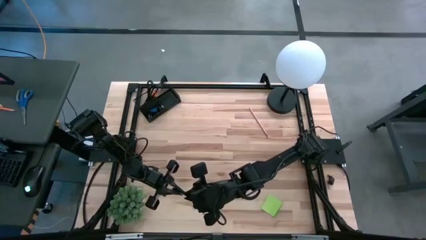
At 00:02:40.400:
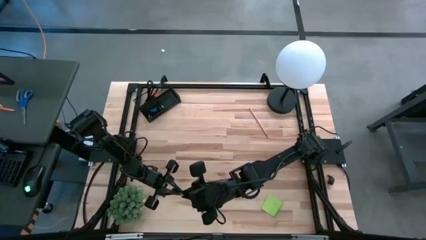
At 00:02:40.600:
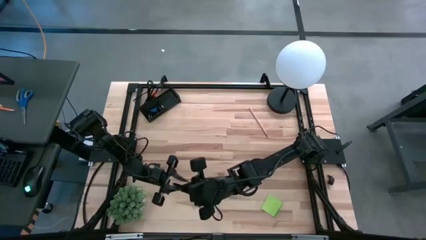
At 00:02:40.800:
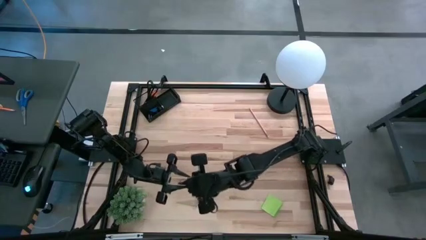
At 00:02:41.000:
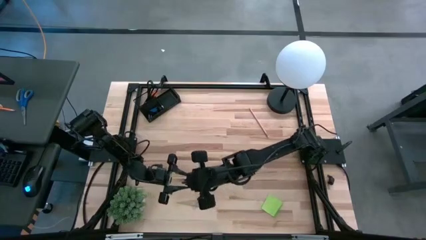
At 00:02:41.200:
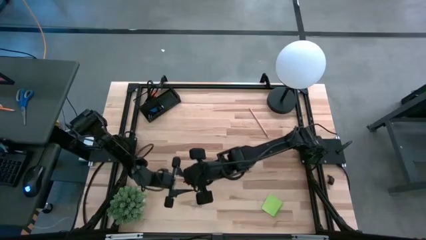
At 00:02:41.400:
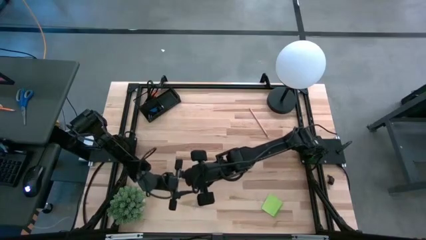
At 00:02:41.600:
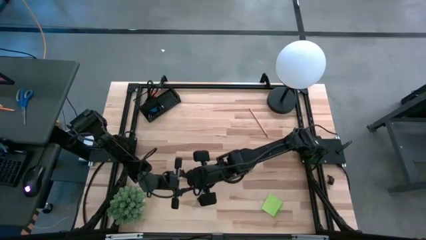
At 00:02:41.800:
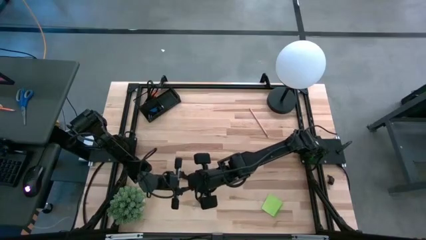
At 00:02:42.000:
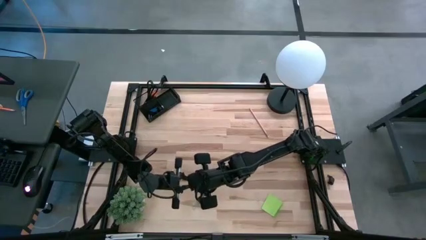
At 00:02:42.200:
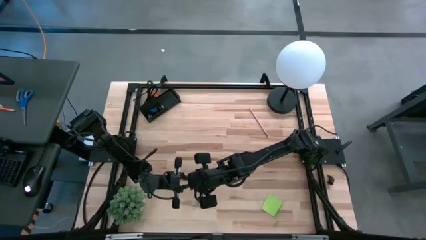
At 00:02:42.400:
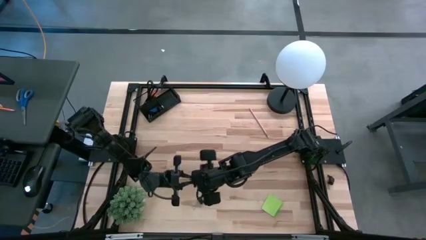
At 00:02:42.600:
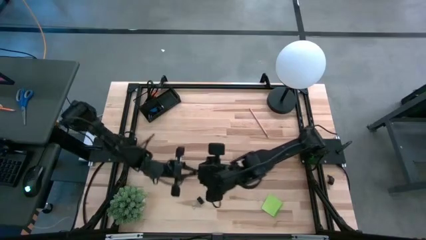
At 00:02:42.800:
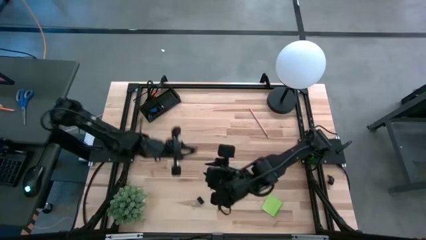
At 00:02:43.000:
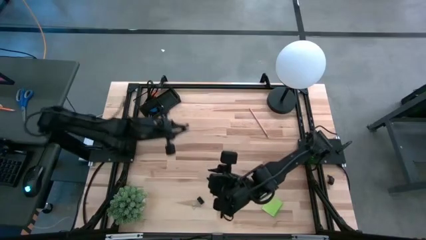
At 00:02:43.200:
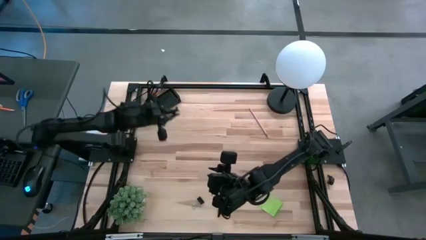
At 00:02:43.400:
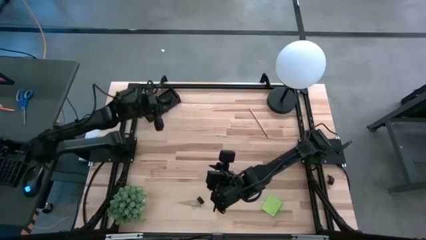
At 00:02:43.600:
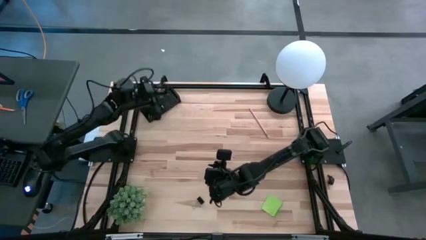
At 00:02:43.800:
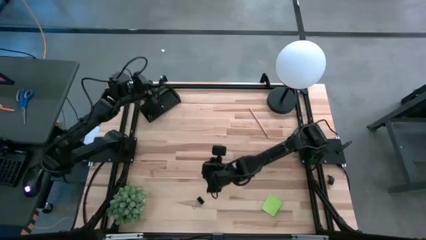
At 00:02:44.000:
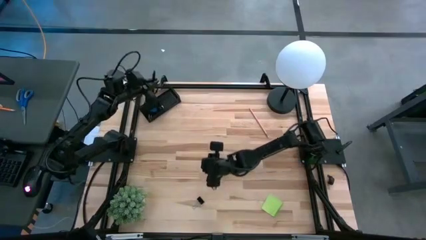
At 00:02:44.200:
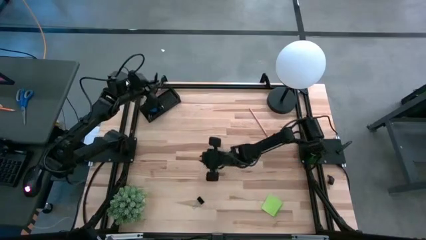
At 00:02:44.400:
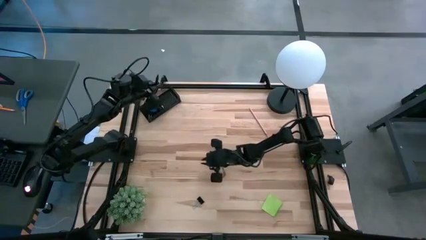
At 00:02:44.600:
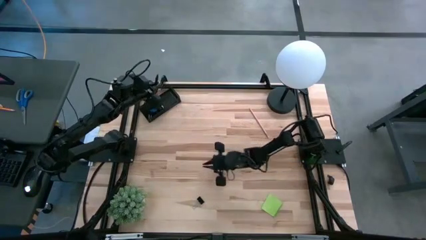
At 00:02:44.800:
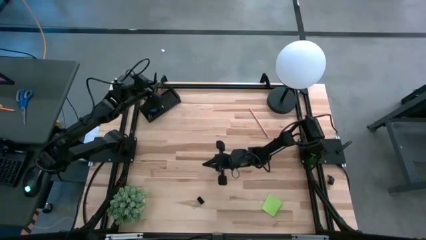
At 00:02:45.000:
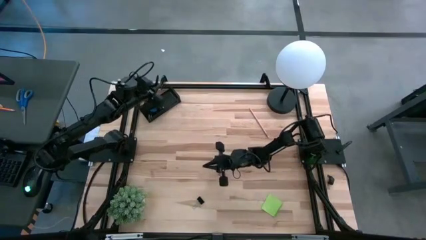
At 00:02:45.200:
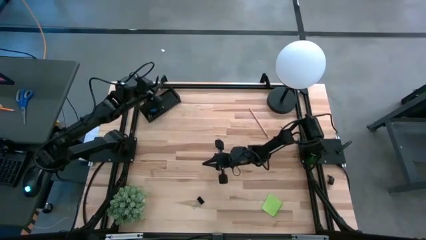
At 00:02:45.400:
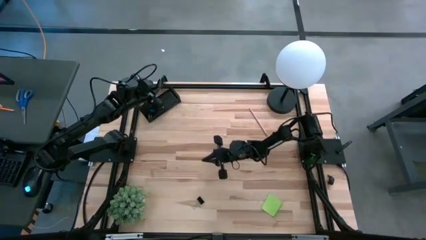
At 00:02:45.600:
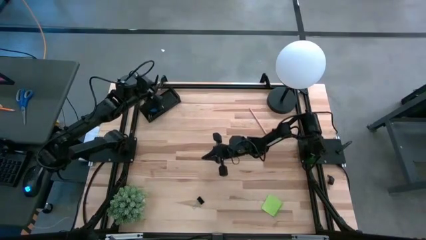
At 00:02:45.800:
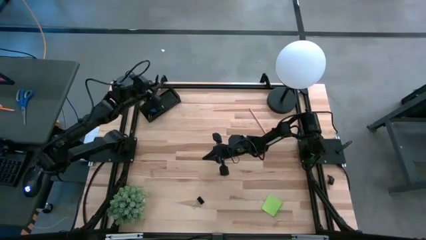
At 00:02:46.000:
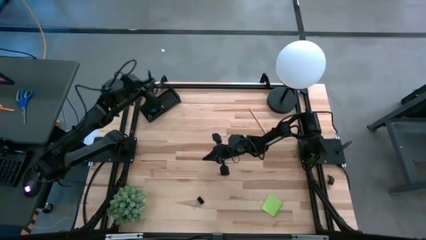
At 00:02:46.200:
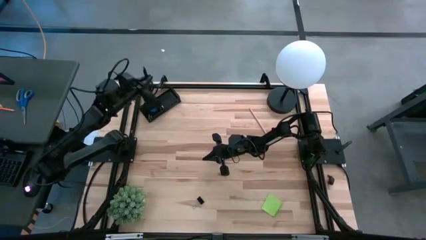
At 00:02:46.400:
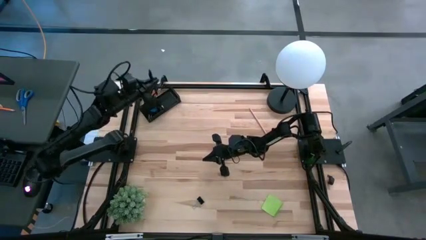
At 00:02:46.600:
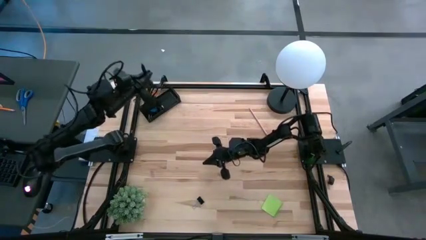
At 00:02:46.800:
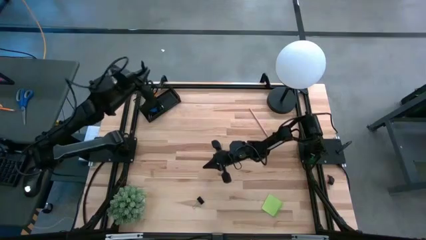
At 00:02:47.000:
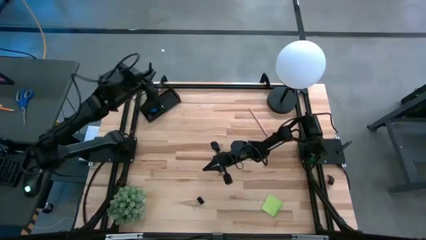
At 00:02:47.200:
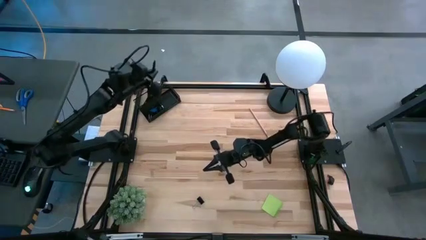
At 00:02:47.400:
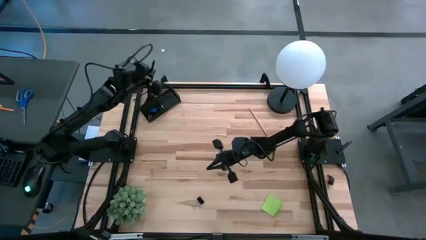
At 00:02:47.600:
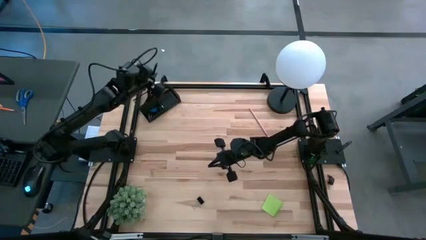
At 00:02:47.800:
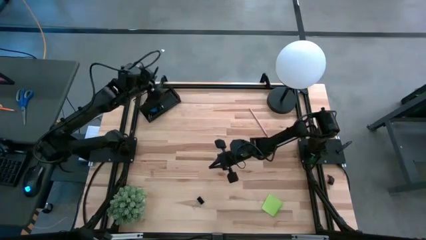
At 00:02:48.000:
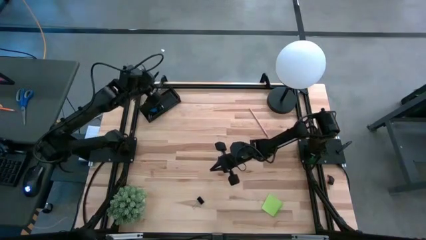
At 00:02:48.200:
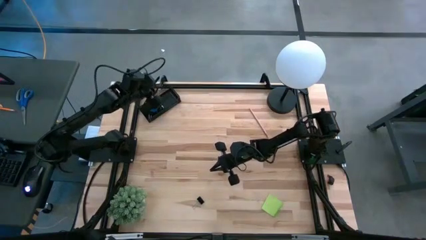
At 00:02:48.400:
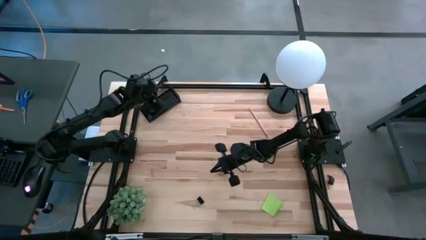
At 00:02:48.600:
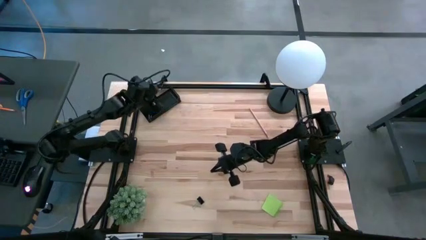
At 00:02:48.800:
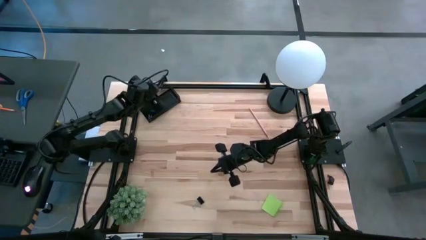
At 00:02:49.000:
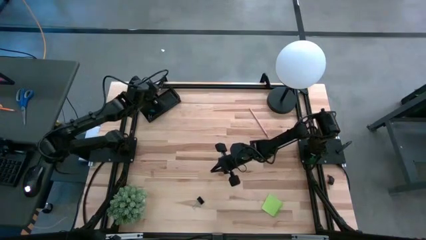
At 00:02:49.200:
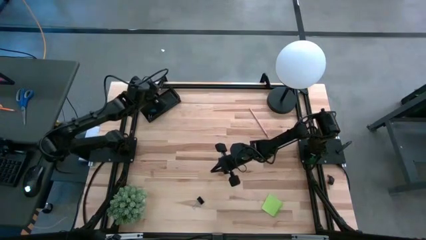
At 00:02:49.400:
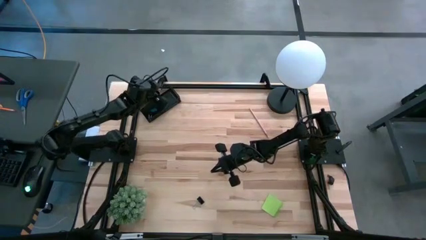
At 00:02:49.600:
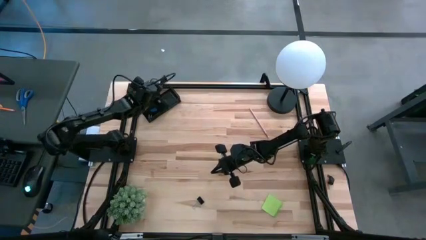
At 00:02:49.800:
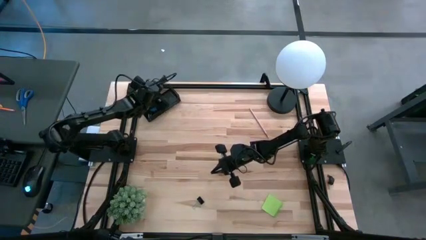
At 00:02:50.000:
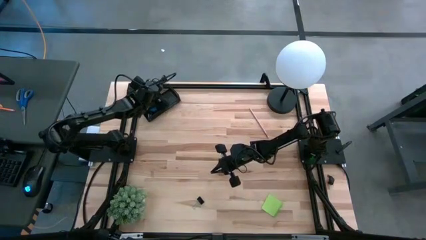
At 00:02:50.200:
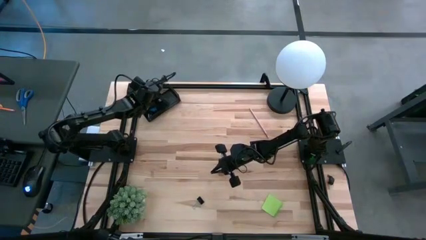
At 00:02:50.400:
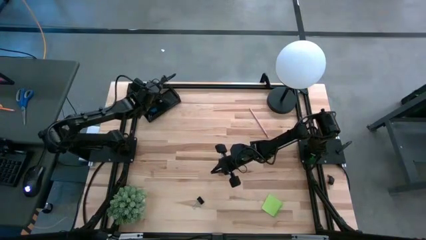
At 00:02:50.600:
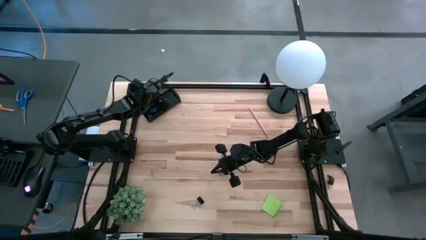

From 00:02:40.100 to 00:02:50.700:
Task: Pick and place office supplies into organizer
Put the black pen into the black desk organizer

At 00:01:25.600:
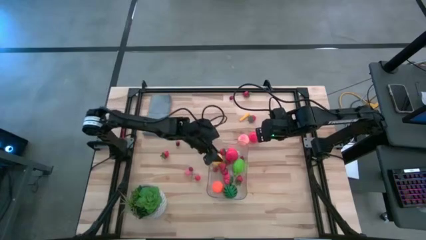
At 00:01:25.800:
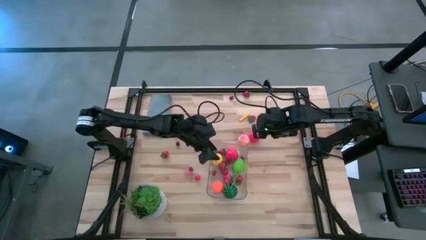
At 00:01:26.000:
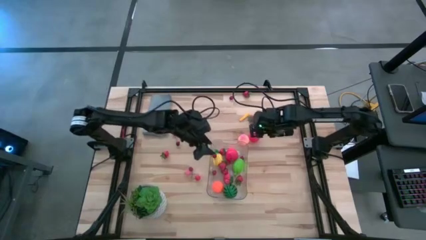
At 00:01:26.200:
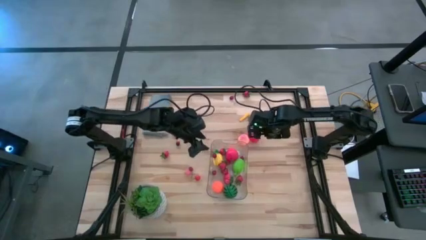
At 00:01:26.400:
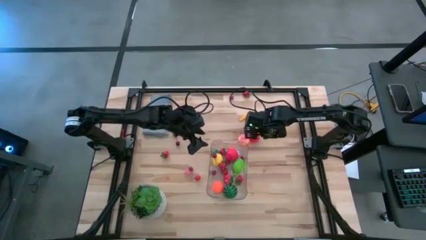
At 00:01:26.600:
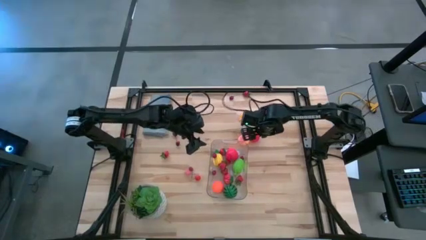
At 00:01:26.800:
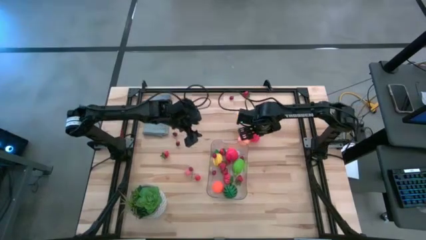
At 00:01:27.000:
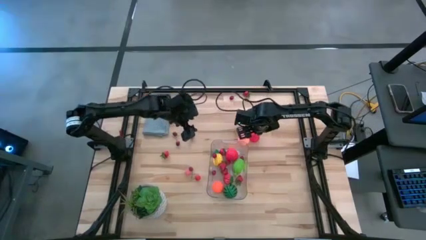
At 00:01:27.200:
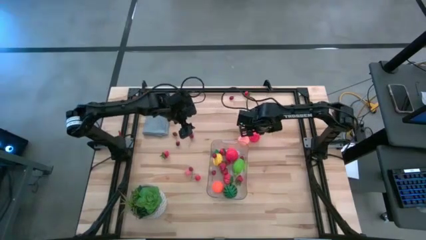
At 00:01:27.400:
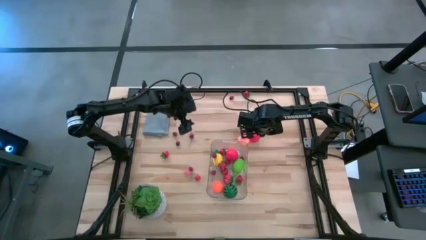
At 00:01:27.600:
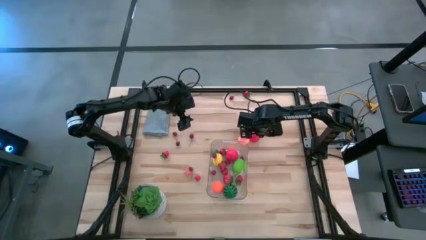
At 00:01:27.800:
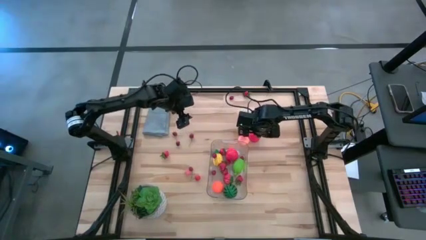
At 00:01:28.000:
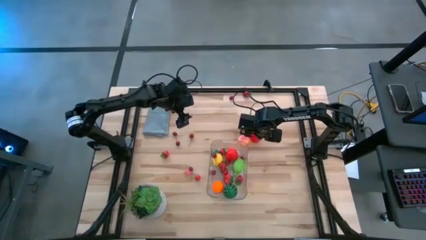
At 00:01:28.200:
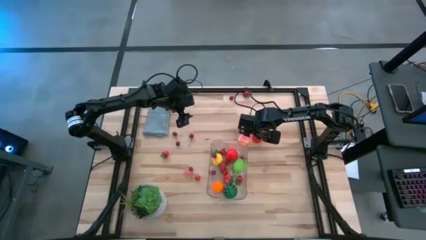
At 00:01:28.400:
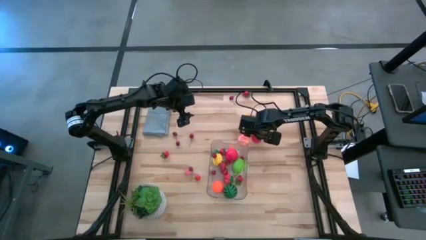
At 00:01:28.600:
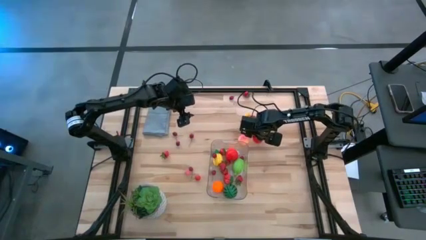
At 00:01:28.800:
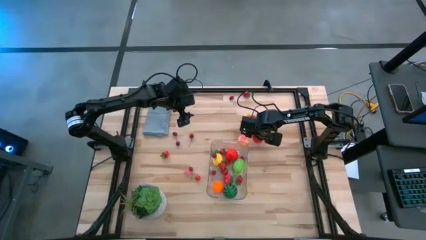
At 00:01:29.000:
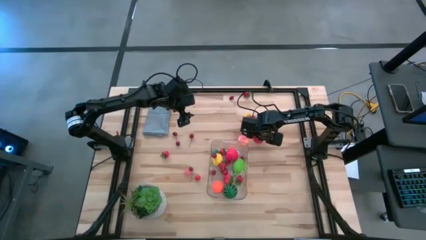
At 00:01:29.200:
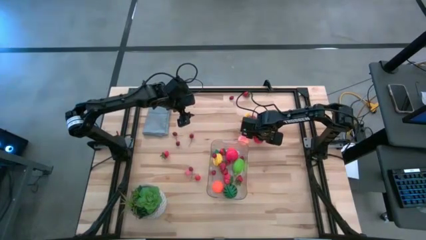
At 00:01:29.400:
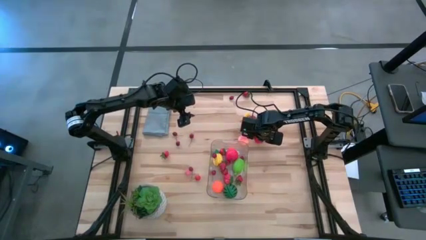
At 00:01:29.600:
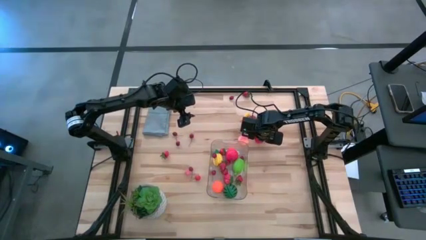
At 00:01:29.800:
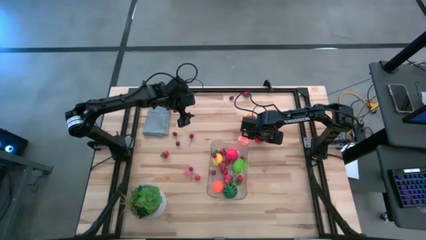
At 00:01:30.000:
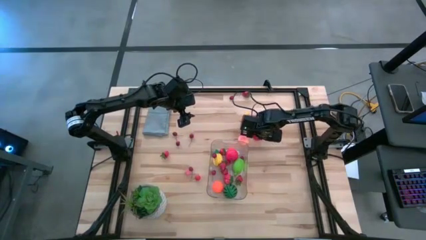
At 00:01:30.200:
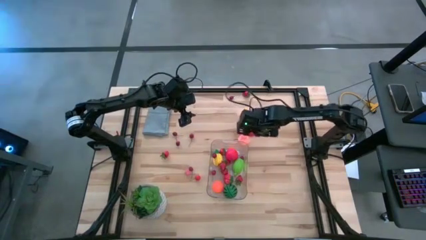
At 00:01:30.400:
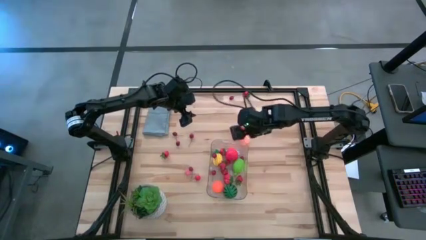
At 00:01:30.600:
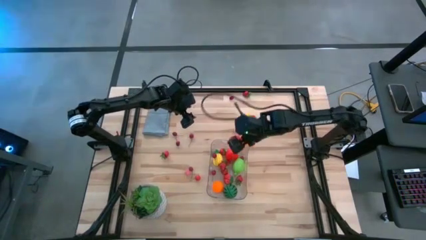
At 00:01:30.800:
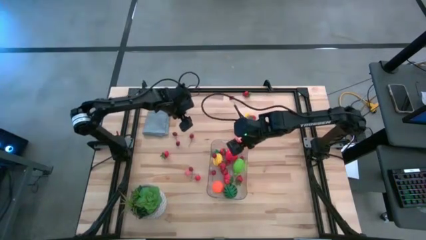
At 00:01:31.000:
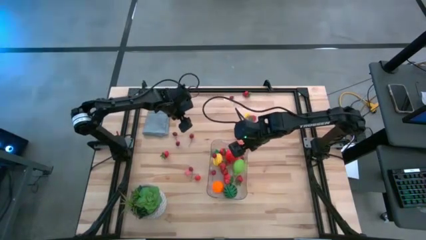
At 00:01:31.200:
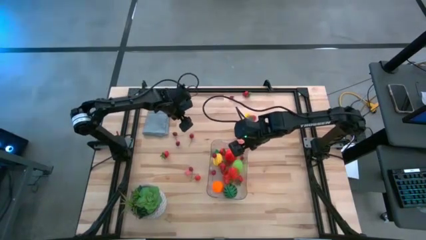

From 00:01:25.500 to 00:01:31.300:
Task: Pick and placing Produce into tupperware
Put the tomato into the transparent bin
